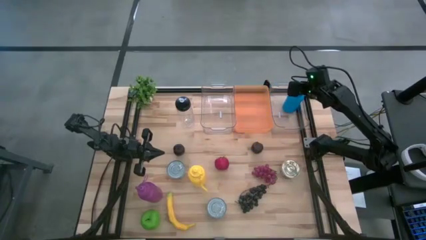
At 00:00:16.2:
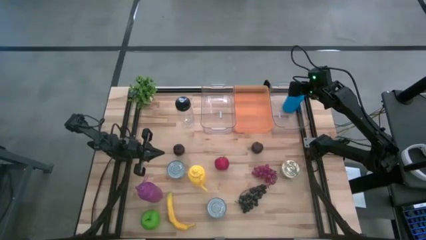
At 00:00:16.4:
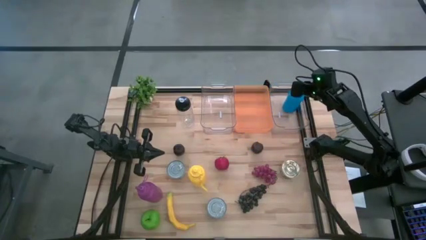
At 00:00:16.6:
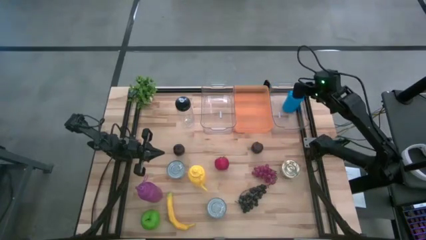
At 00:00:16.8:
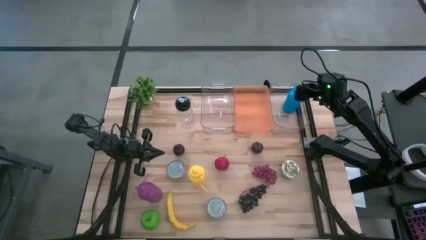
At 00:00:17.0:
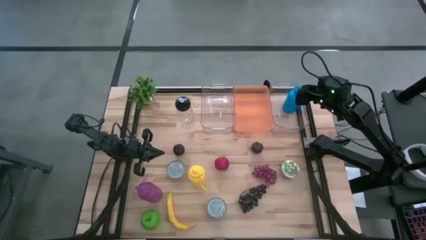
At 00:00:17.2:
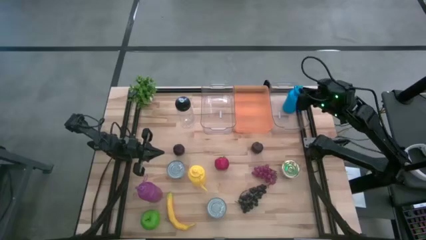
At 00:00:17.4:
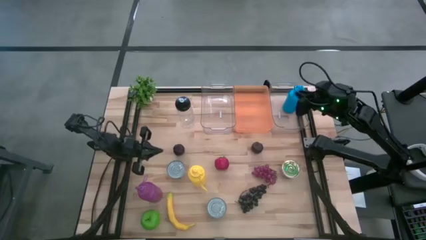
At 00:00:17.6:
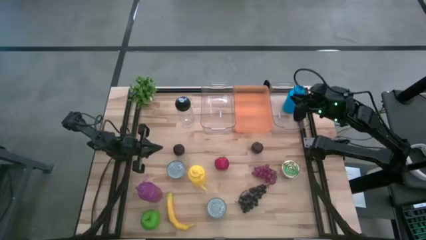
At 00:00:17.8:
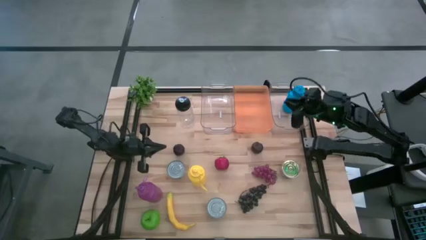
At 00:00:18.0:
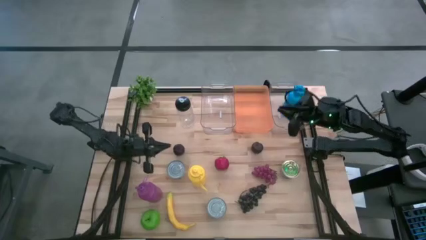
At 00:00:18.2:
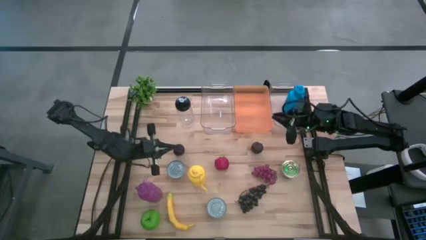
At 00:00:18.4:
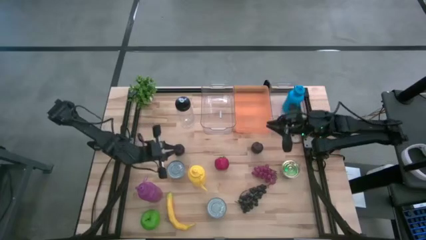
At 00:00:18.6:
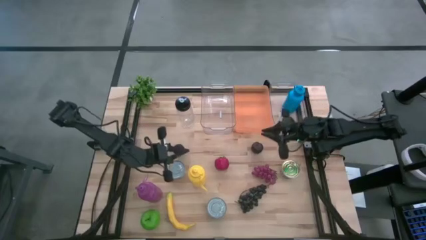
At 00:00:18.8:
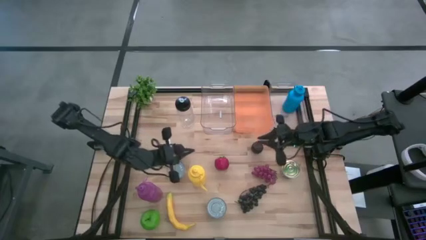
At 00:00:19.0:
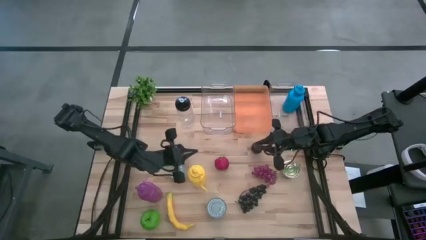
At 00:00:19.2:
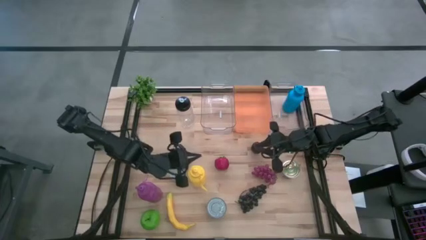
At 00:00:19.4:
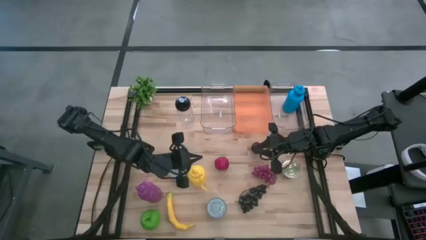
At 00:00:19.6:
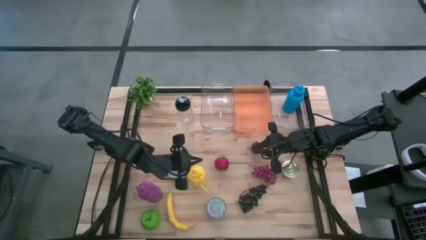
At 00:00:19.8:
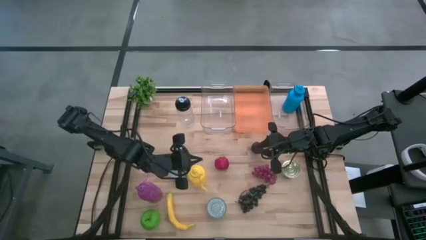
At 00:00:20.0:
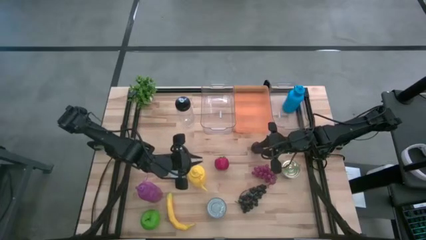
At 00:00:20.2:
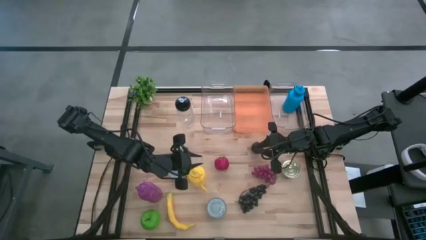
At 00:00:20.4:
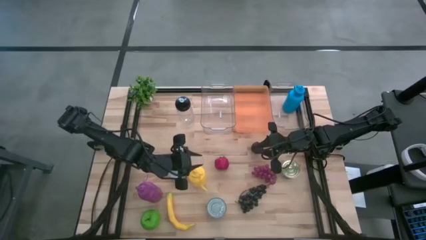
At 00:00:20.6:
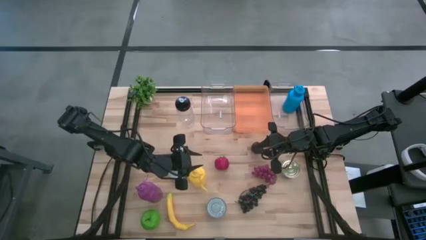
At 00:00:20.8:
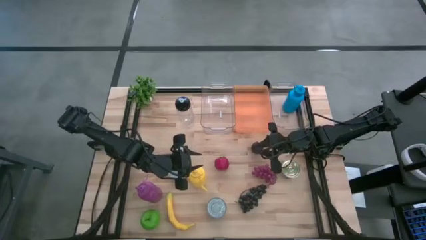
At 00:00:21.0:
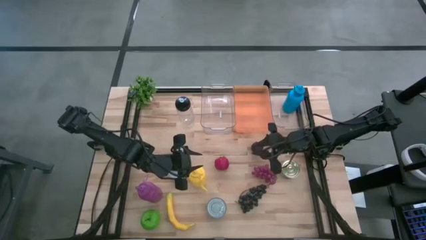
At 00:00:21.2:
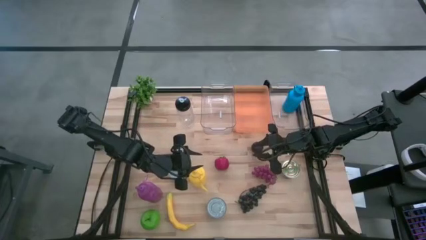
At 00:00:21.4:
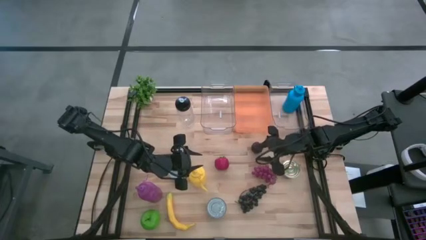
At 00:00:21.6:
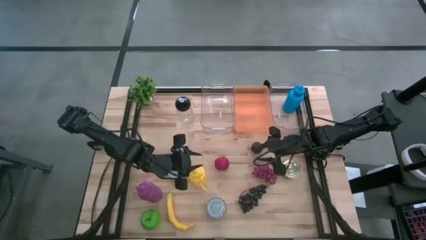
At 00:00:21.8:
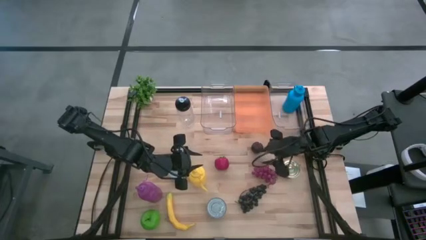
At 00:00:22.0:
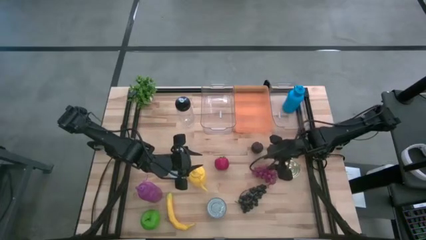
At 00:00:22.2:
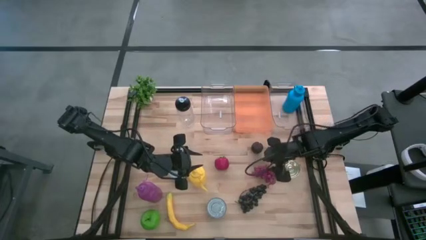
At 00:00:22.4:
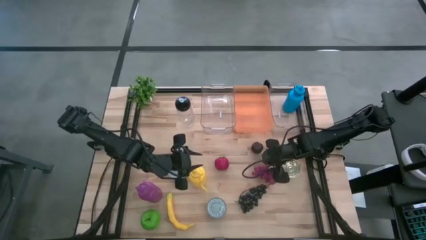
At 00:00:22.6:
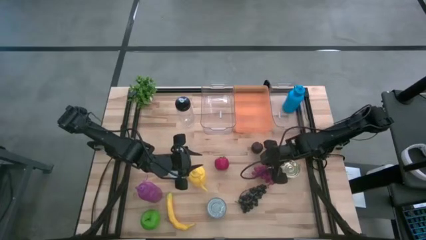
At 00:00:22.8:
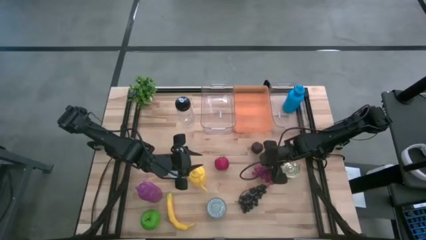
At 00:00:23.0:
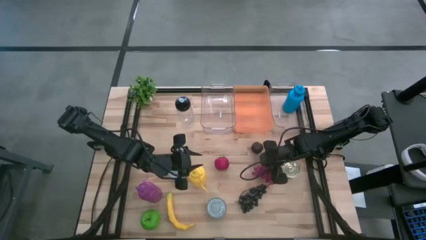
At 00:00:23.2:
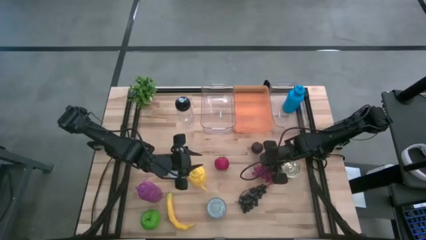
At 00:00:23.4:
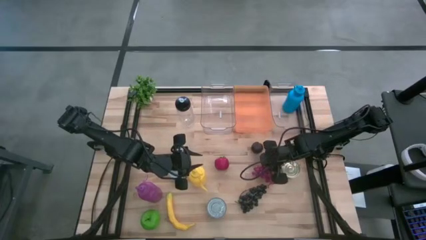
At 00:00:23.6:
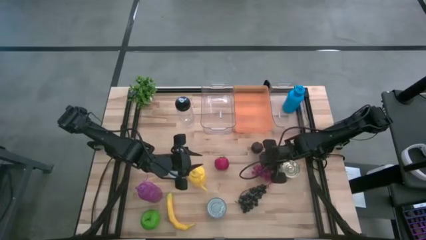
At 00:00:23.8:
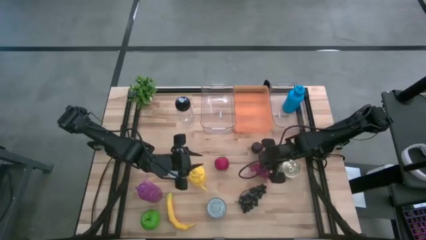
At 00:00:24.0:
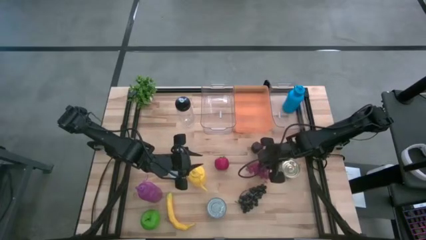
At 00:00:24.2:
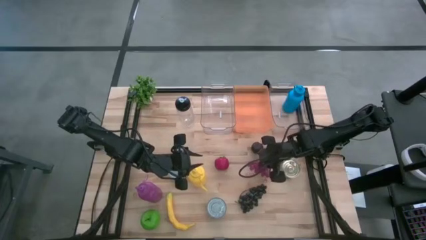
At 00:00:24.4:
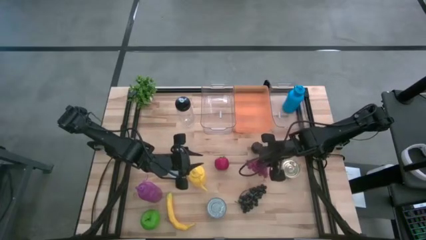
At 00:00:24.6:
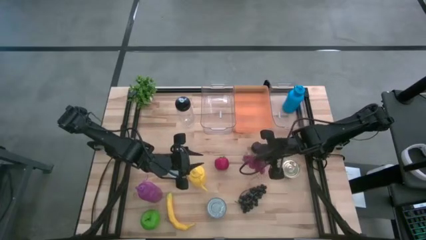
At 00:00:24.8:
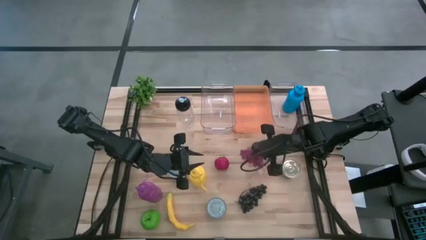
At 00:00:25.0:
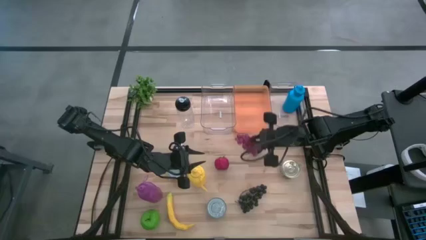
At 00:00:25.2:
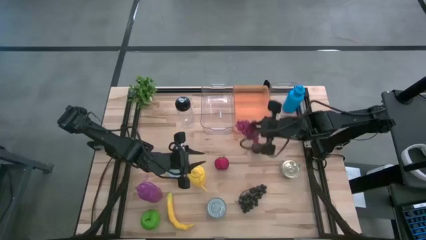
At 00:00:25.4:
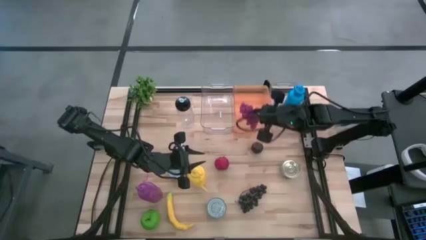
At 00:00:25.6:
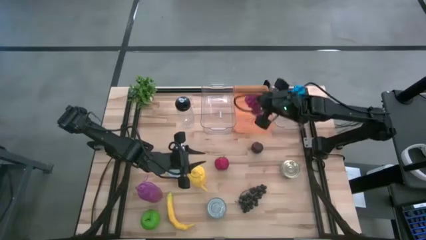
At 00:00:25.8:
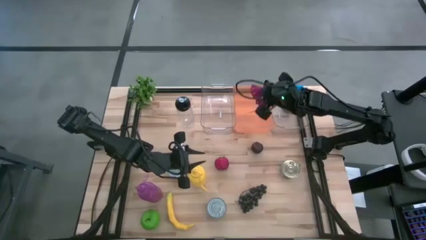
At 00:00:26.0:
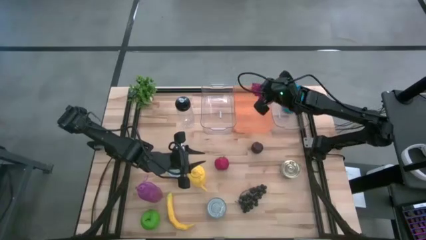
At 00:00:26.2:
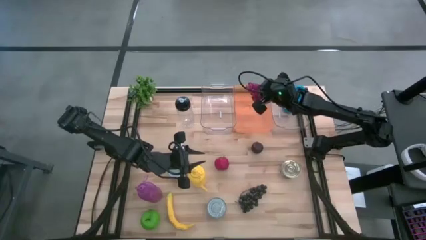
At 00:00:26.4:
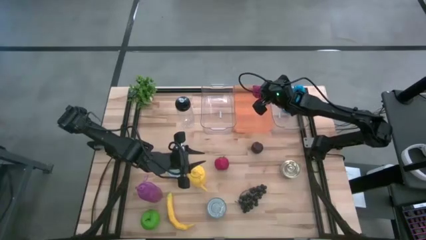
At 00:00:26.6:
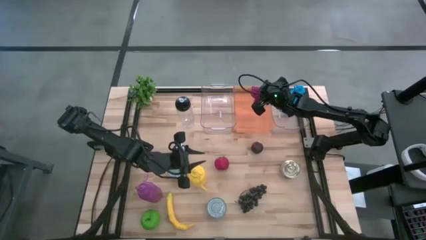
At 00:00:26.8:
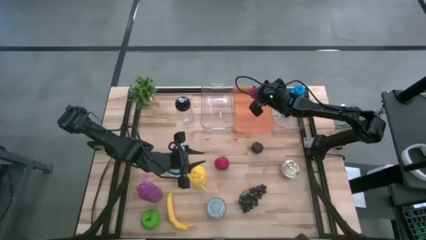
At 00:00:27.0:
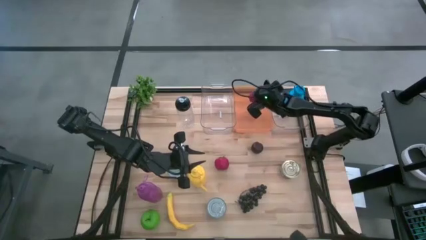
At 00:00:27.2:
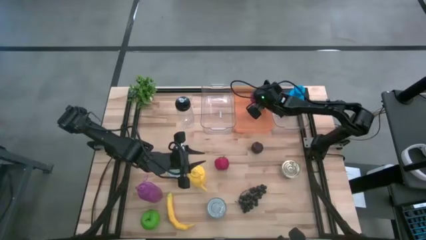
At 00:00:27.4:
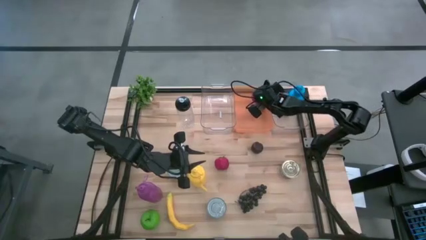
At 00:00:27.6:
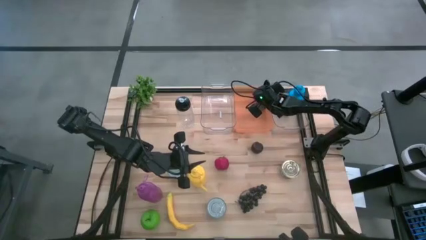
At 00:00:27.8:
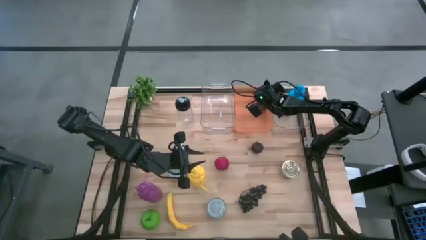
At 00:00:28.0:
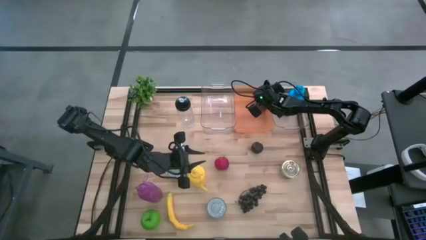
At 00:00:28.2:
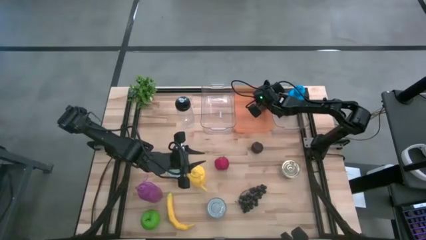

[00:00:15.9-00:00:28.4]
Task: Pick & Place Food Item
Put the red grapes into the orange bin
